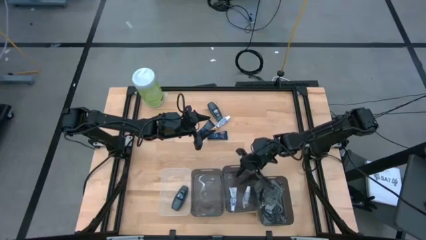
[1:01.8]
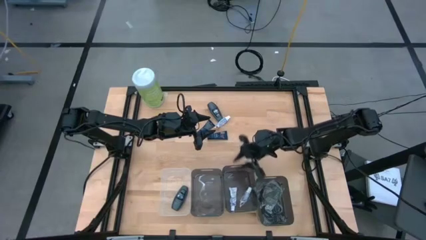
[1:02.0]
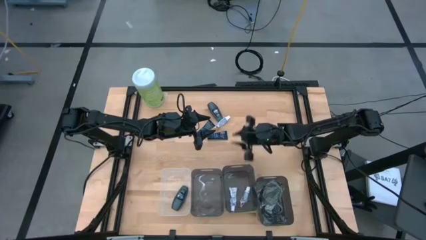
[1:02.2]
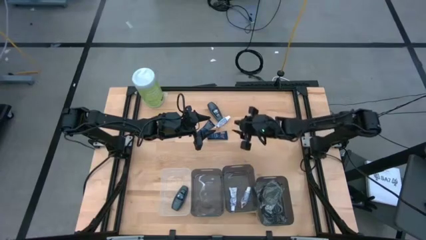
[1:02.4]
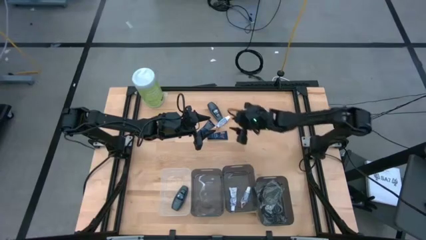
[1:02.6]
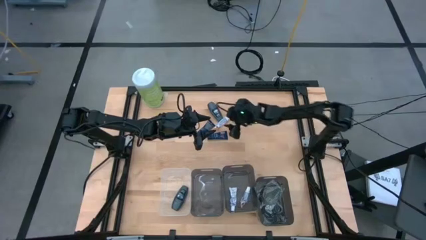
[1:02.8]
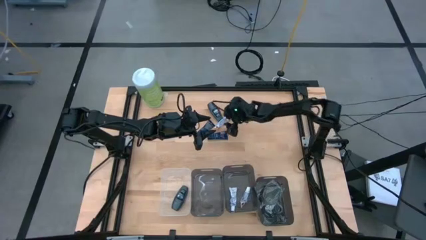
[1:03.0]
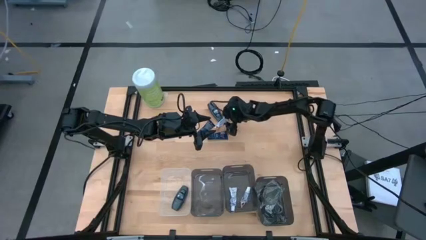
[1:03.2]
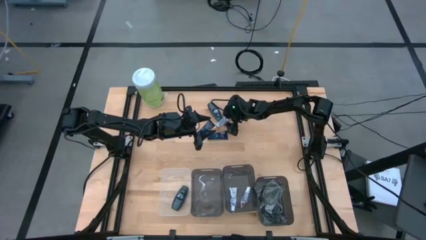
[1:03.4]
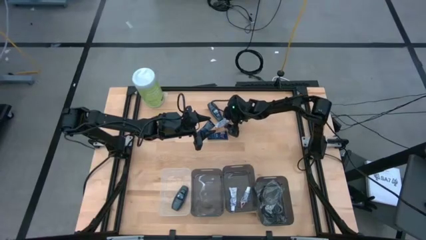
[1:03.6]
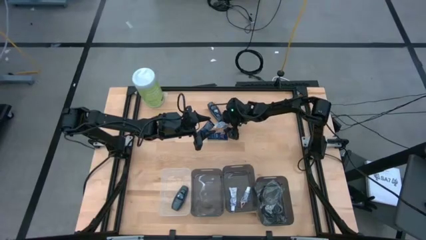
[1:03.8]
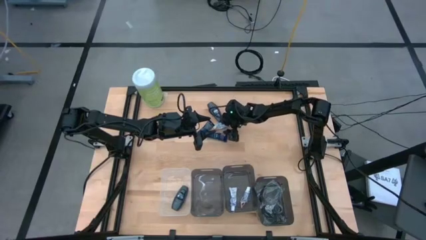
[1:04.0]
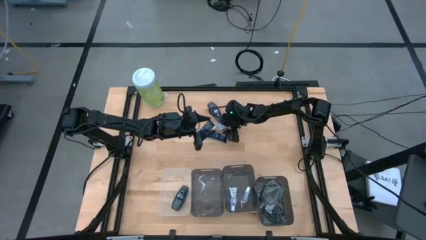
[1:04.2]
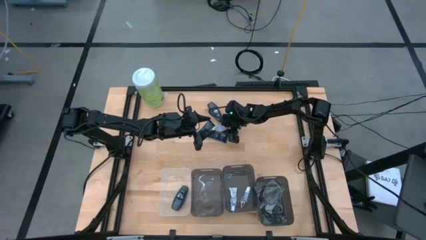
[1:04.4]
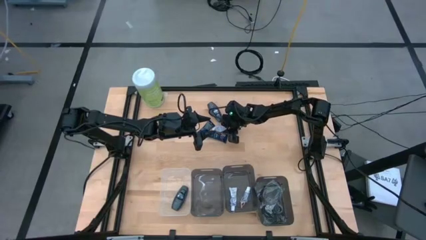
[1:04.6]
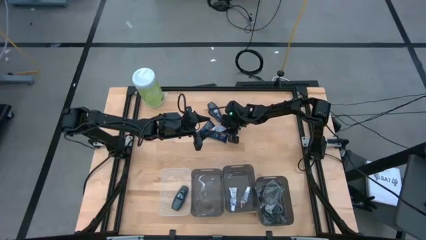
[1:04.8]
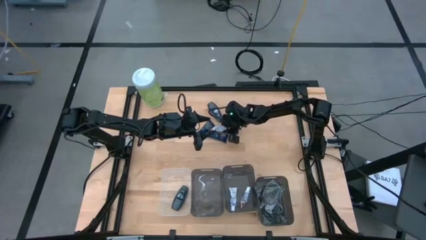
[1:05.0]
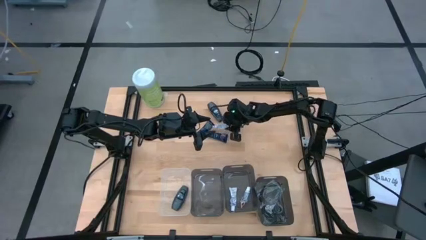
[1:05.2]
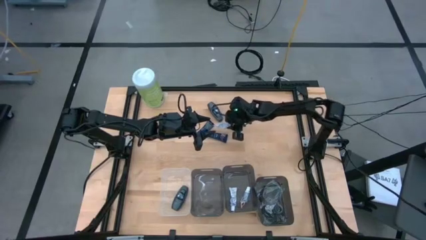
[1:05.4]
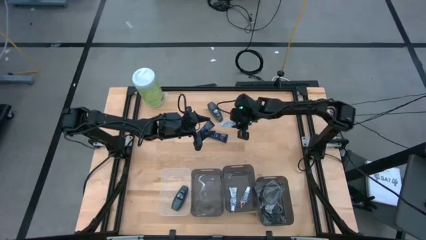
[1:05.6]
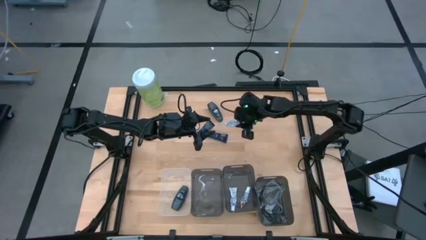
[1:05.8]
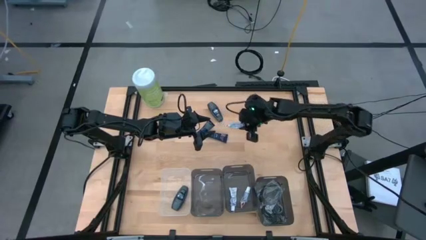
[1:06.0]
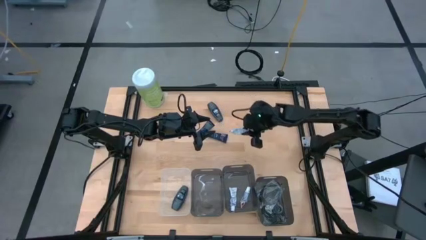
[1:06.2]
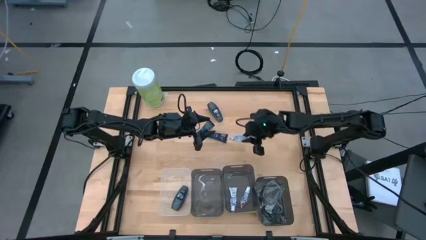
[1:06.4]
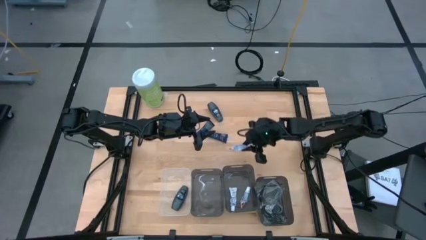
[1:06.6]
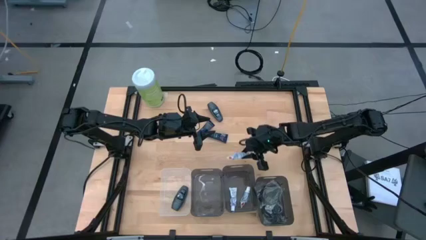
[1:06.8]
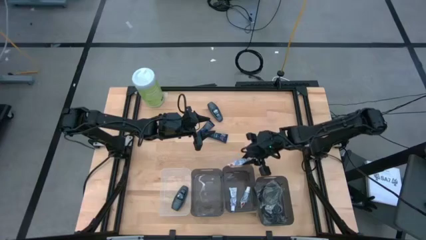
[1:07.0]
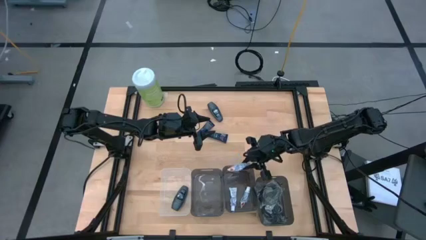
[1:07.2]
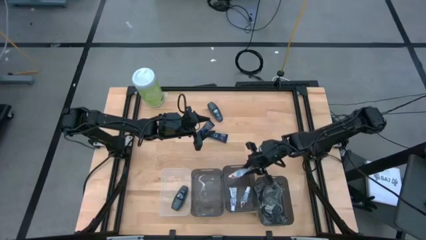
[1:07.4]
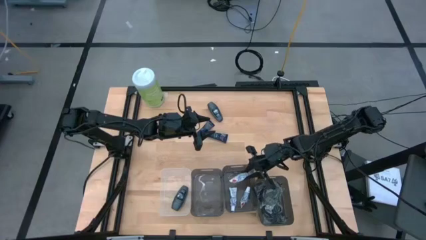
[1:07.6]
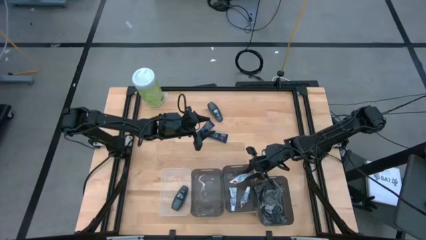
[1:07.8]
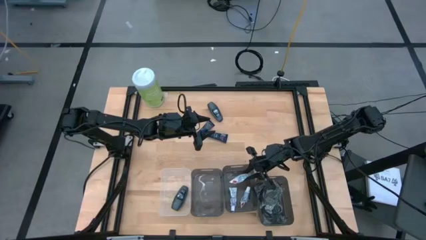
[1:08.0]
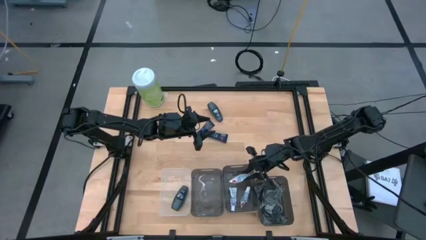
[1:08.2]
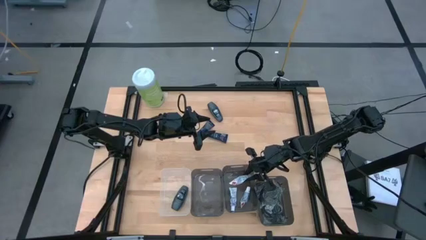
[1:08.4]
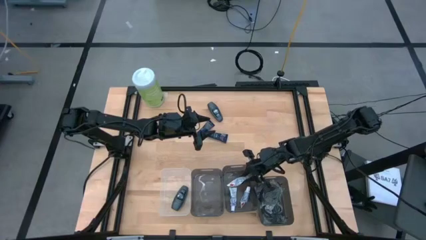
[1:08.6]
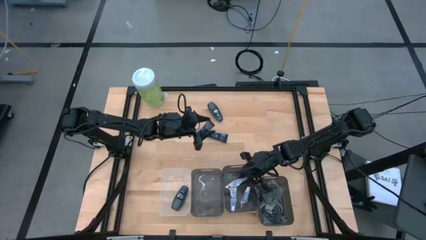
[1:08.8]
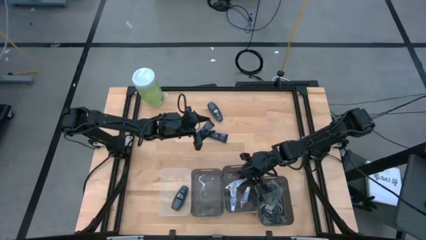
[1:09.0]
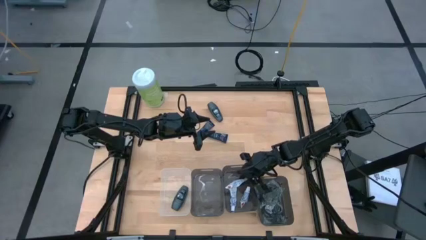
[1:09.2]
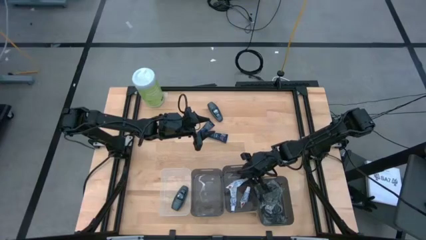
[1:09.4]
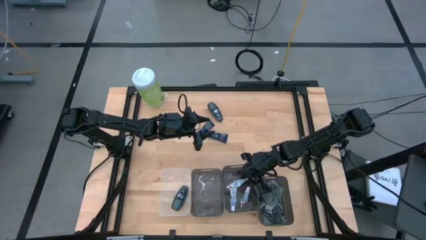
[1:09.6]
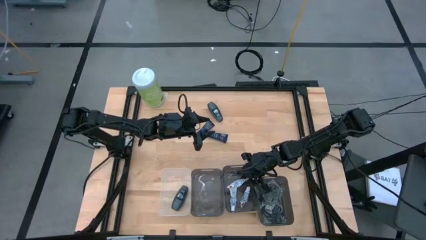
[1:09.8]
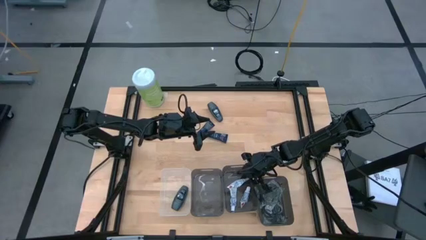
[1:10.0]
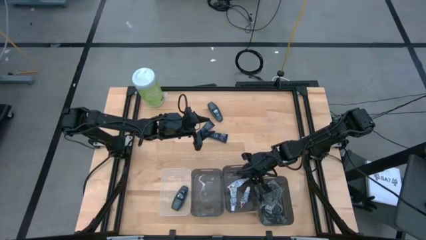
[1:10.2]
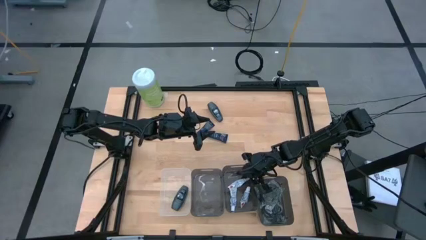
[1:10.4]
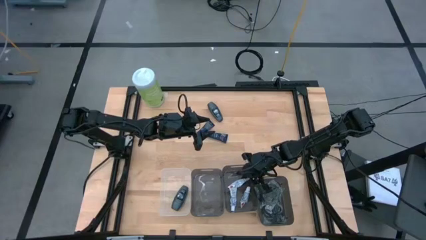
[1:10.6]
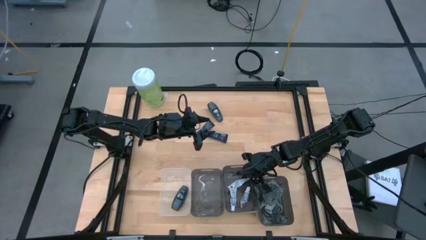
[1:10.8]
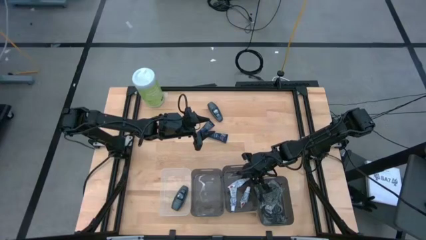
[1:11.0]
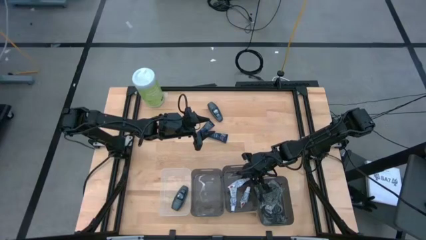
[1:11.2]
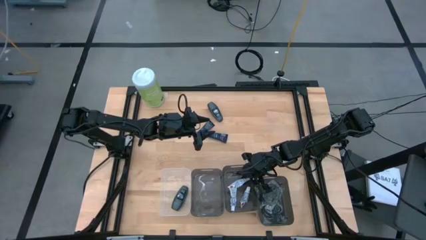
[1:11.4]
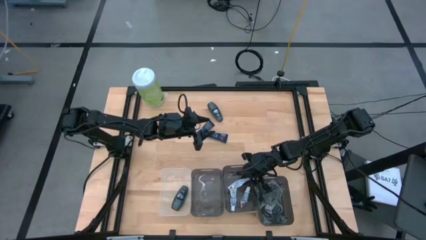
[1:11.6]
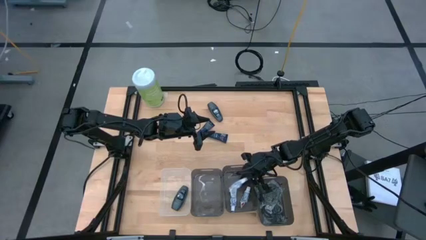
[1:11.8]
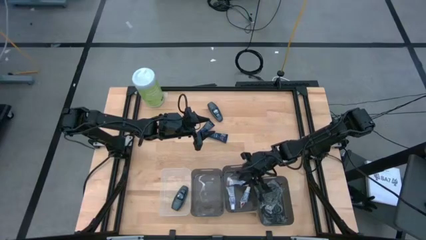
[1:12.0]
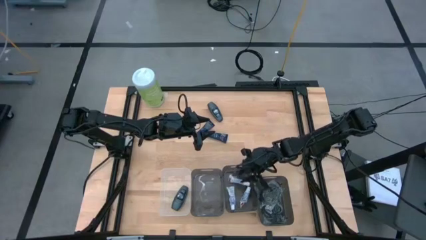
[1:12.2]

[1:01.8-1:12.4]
Task: Pick & Place Travel size toiletries
Put the white toothpaste into the middle black bin

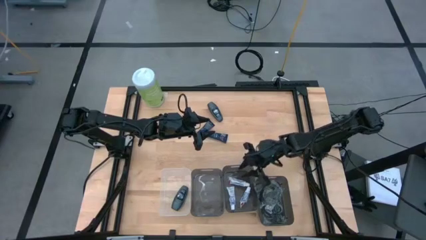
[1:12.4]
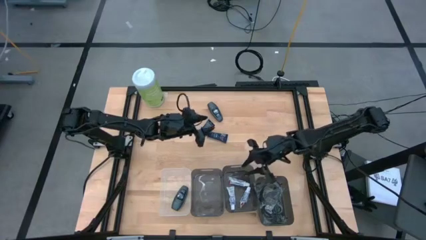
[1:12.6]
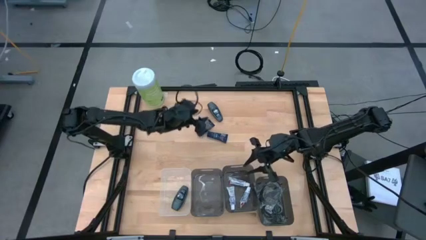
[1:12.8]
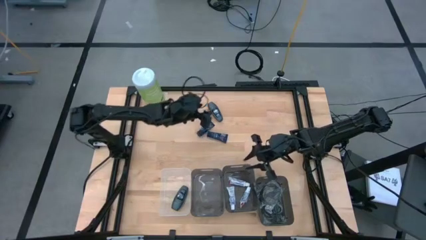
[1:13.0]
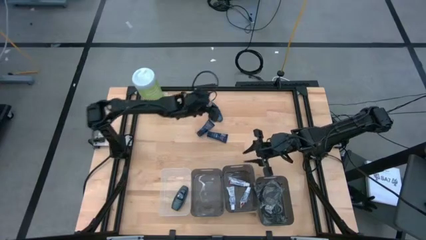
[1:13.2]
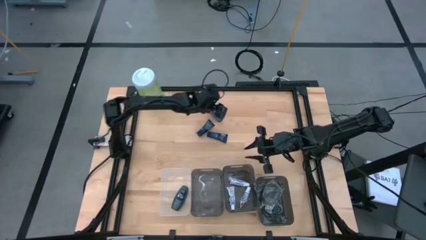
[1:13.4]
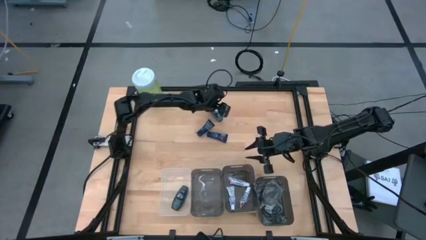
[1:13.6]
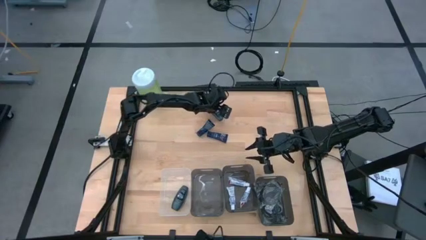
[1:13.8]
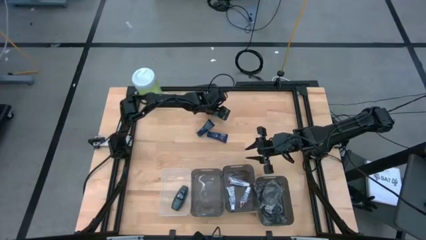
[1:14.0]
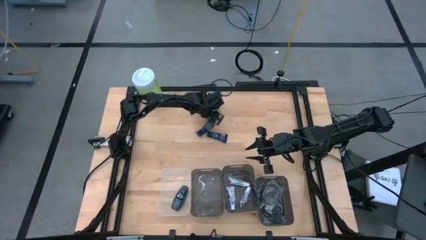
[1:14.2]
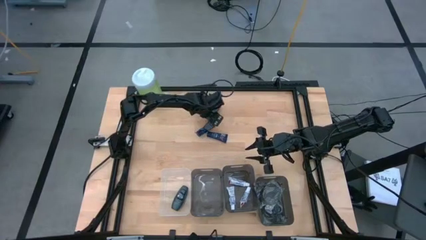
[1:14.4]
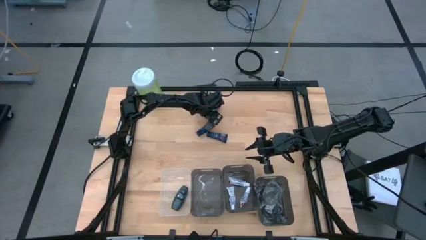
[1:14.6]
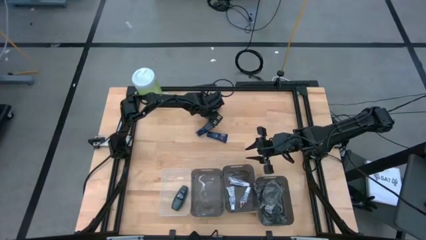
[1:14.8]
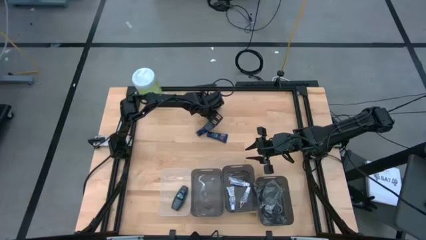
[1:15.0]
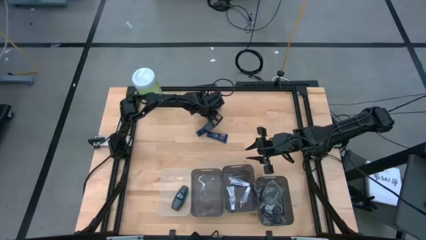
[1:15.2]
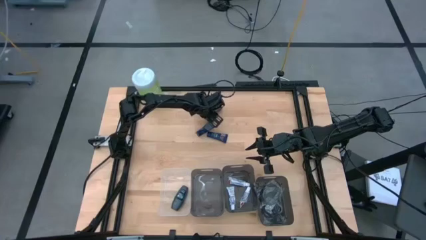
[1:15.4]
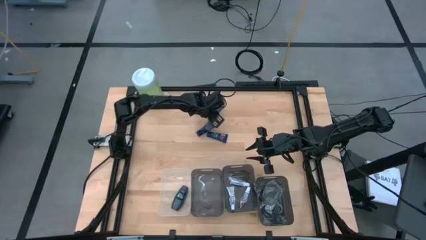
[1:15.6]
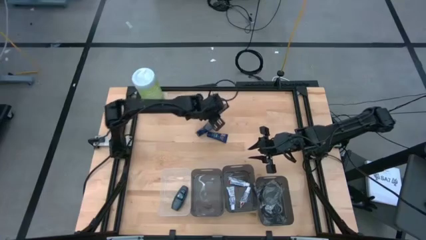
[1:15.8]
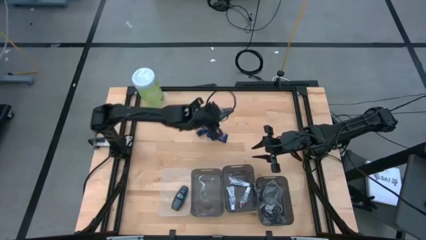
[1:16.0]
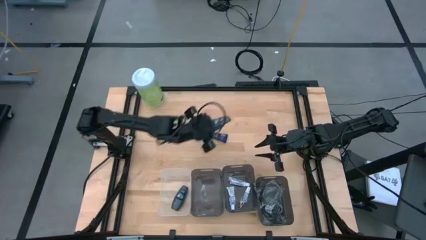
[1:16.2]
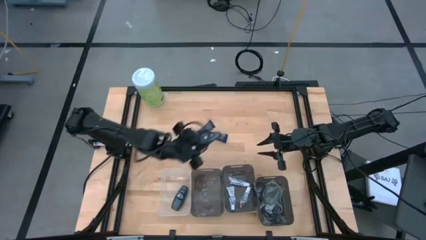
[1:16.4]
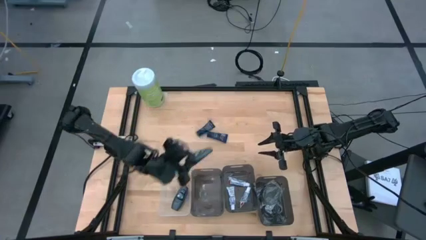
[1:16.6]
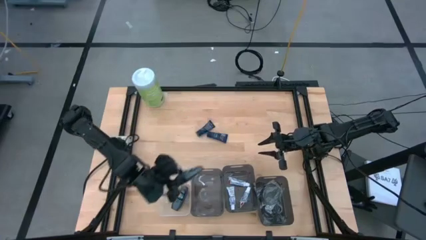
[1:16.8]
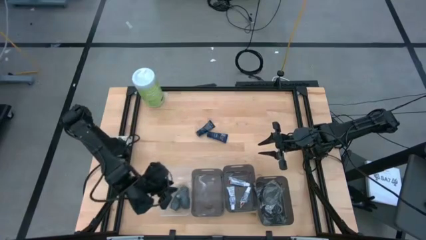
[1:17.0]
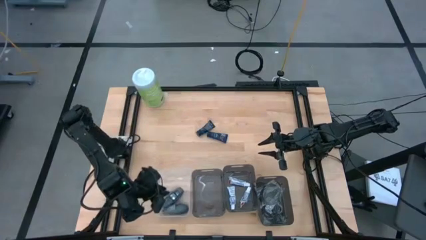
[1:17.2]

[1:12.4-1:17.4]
Put the black deodorant into the transparent bin

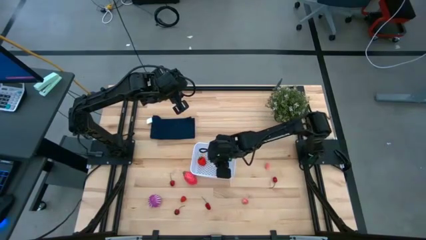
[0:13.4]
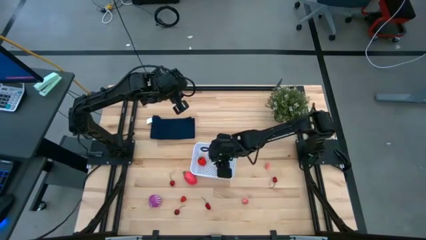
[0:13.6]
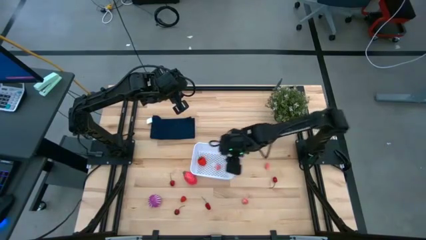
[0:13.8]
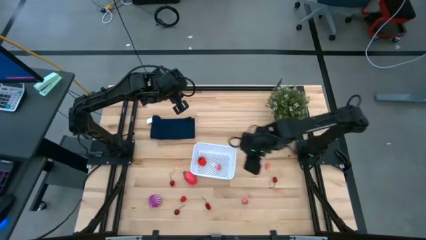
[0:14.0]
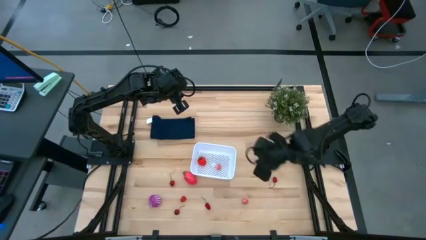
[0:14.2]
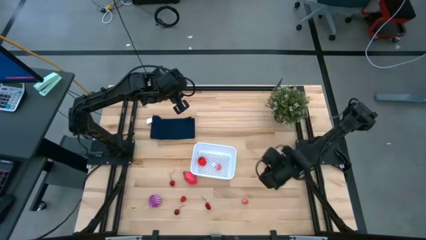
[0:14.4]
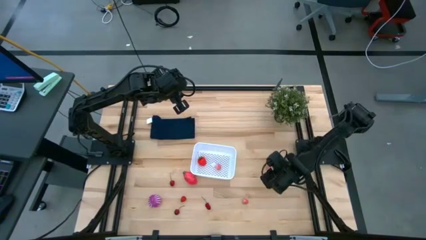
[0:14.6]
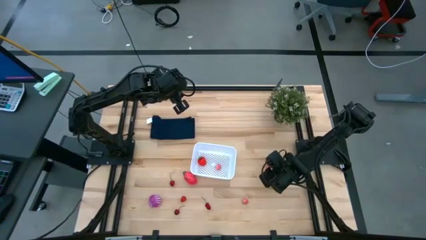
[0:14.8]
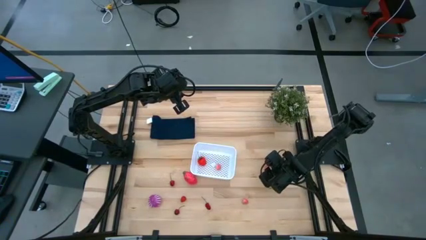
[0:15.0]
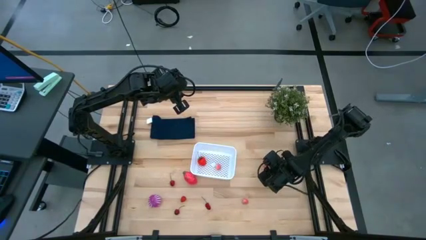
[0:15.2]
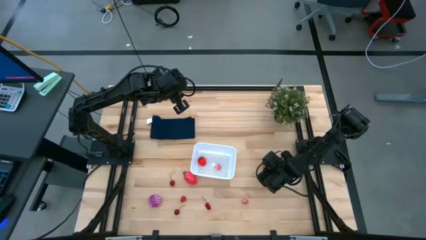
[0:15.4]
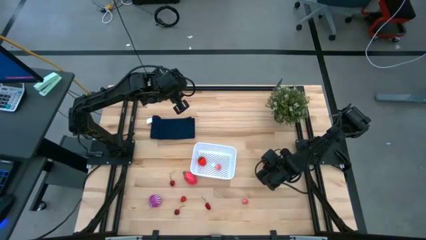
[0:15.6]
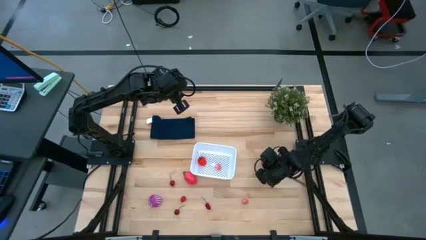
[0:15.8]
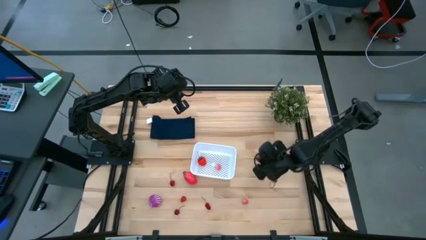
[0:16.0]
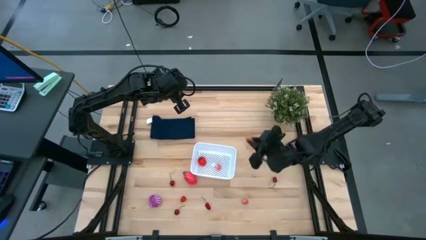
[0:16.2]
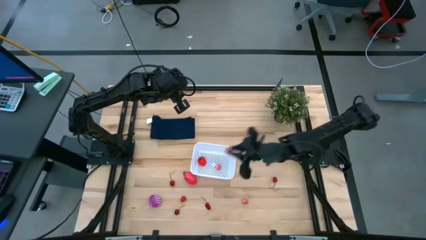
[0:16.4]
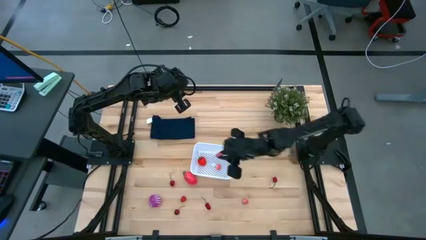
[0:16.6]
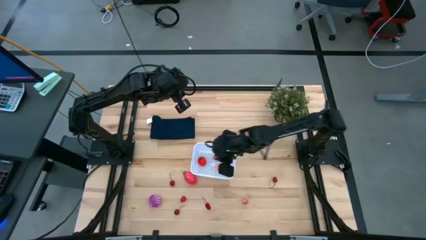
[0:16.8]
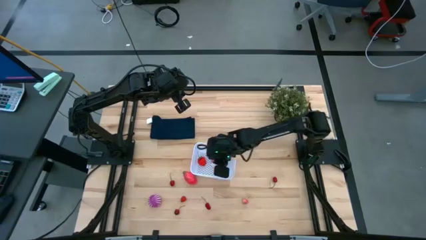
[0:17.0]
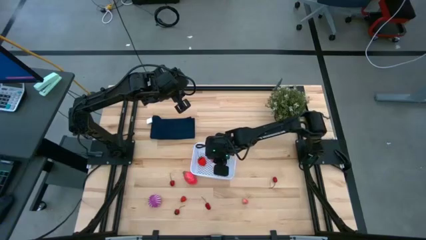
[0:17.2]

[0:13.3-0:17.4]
Task: Pick and placing Produce into tupperware
Put the peach into the white bin
